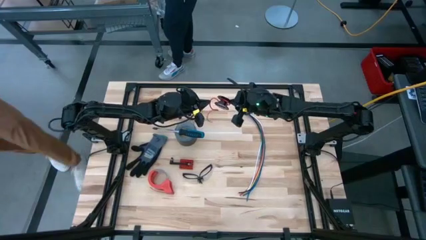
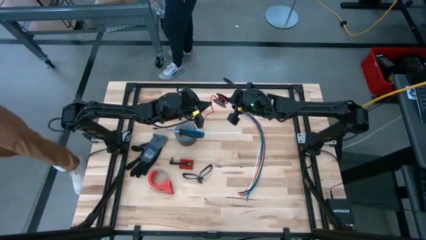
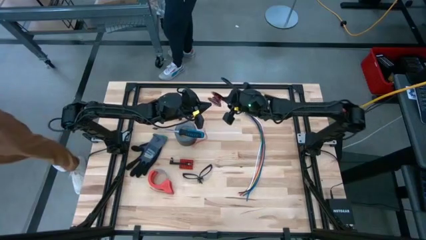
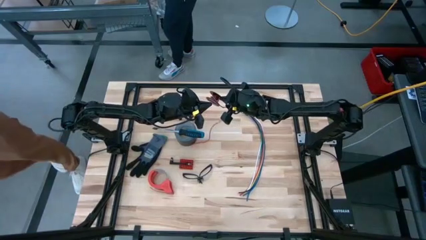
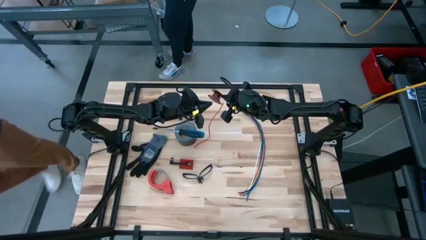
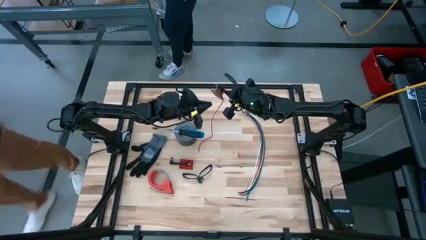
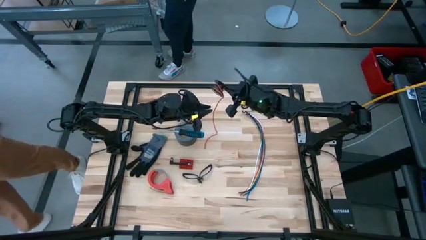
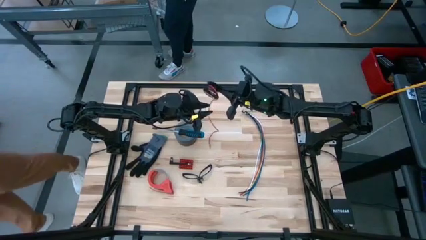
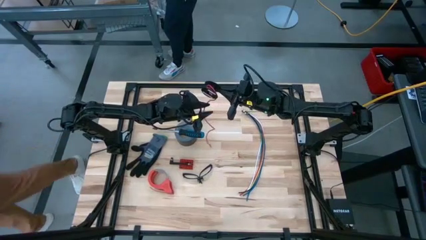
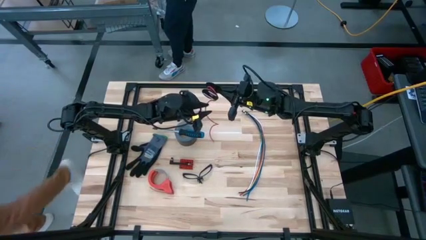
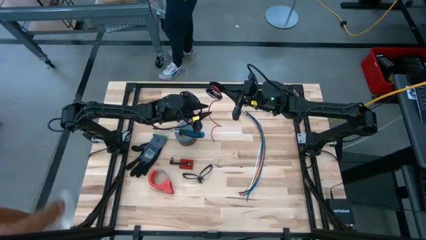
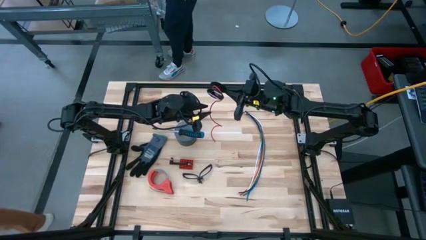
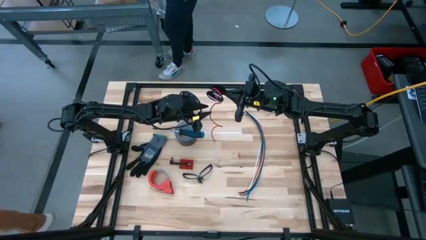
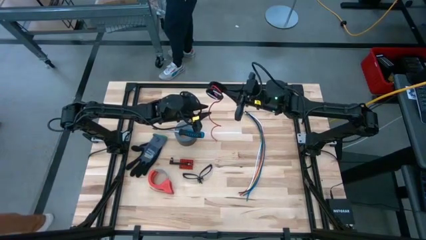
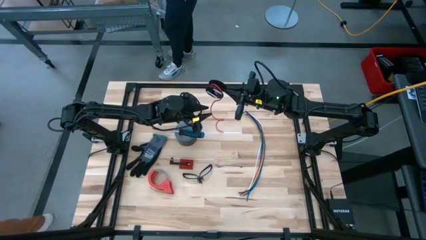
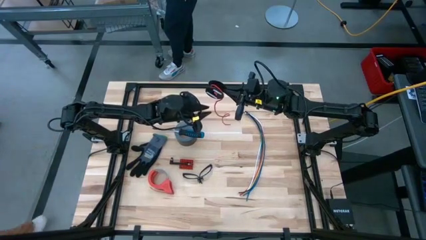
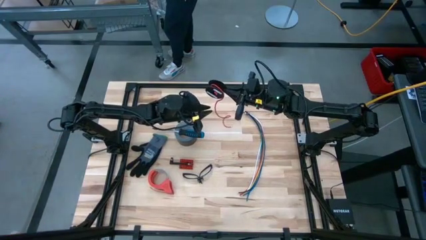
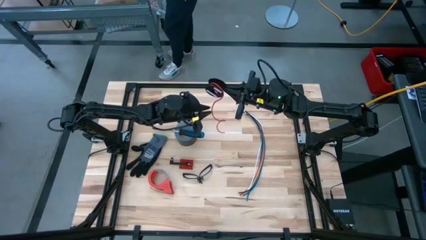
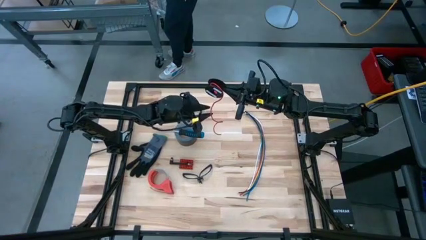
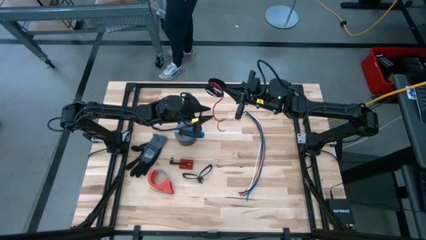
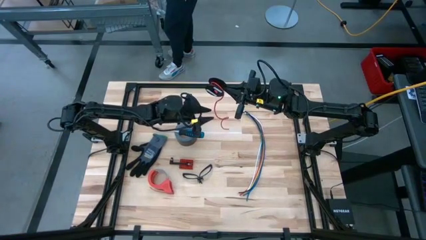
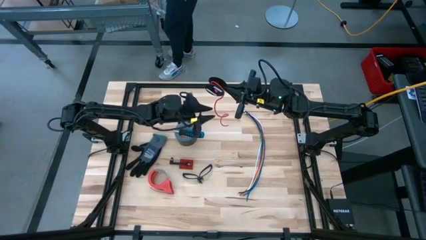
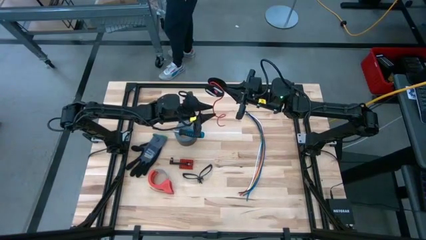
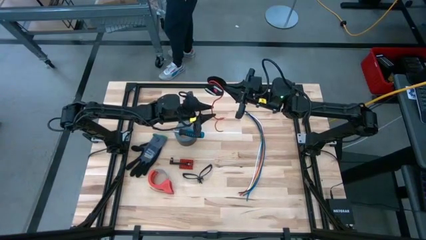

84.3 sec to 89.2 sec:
Task: Coil cords
Coil the red wire into the black spool

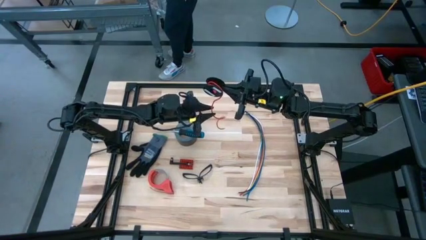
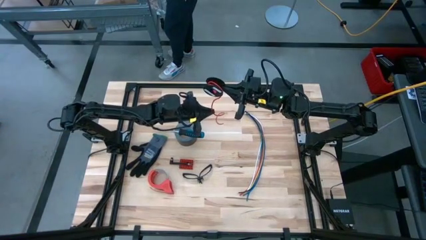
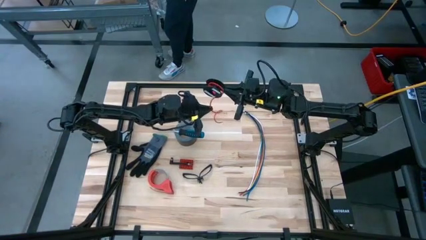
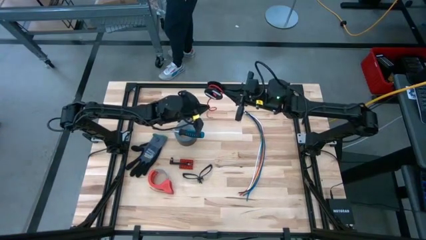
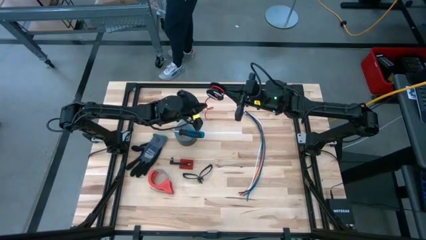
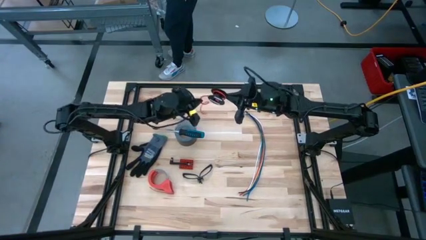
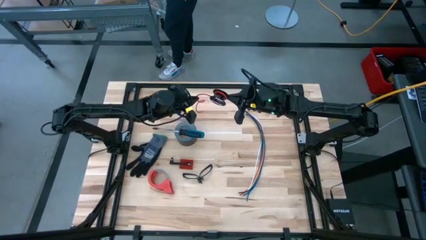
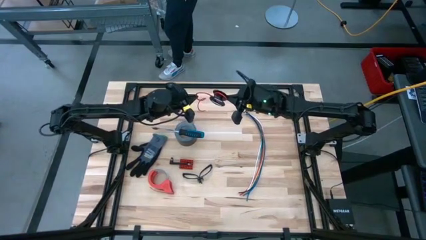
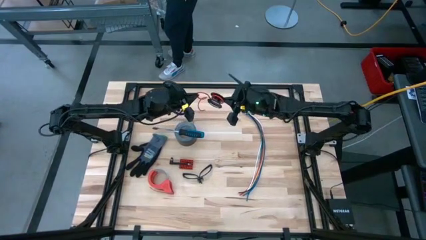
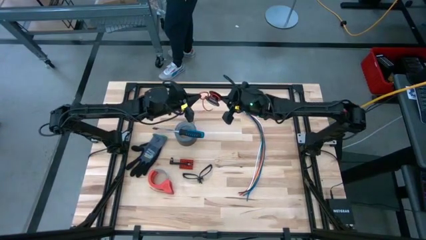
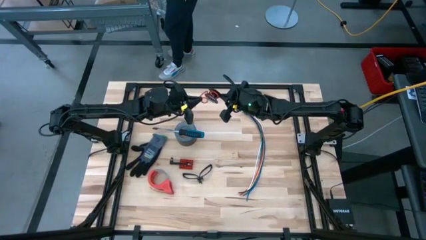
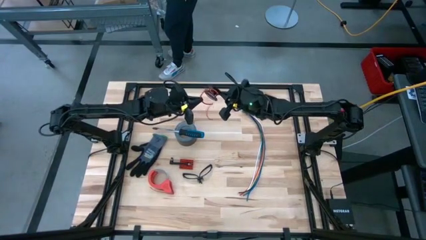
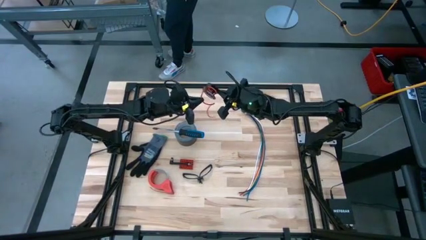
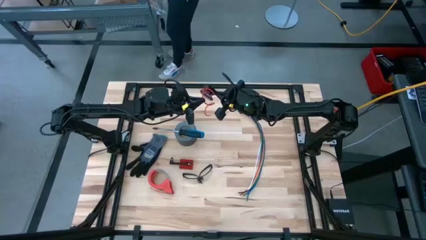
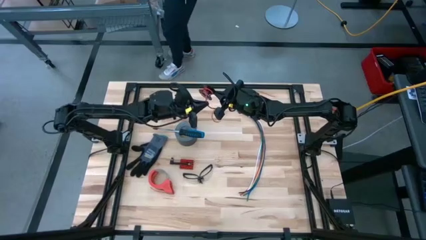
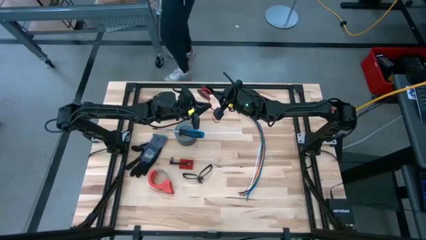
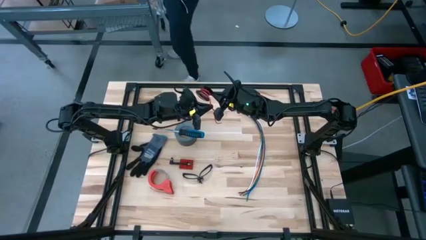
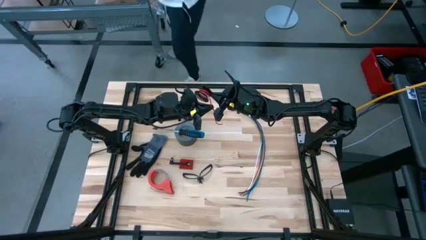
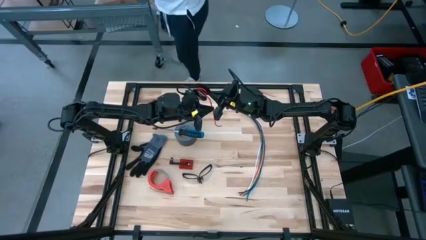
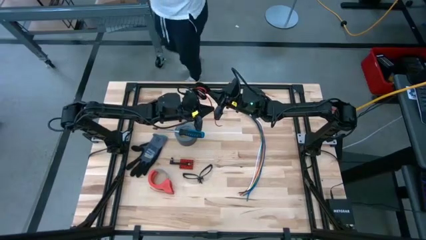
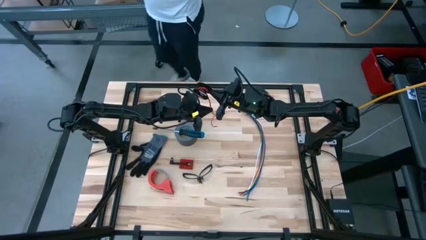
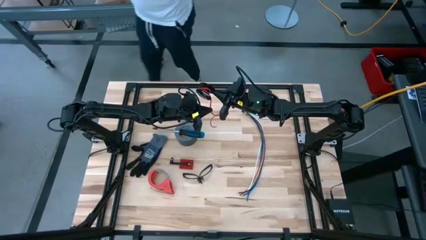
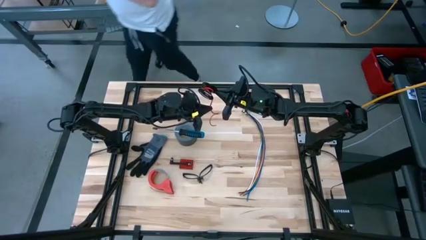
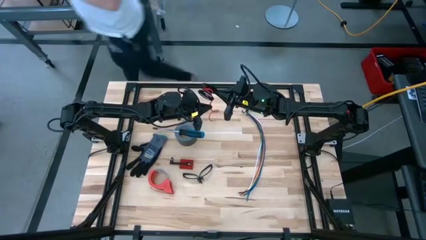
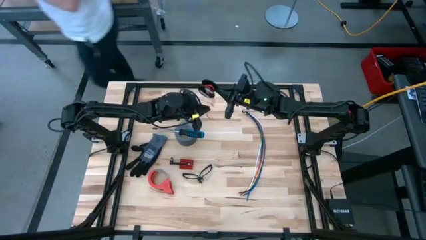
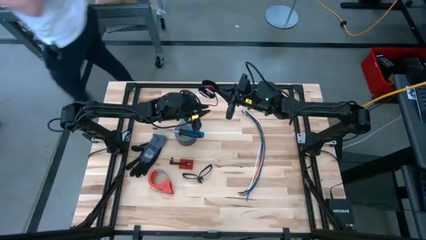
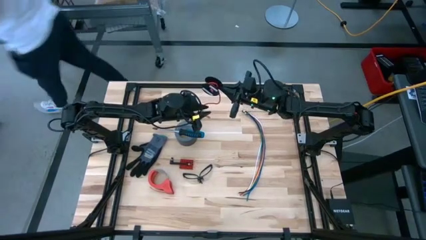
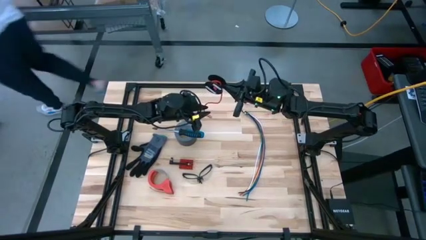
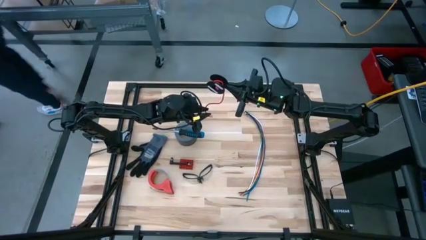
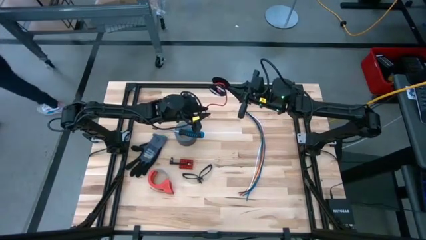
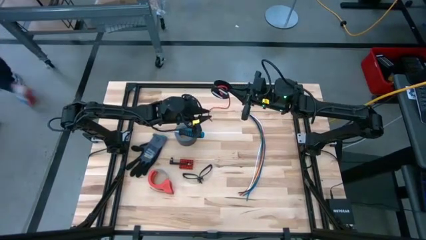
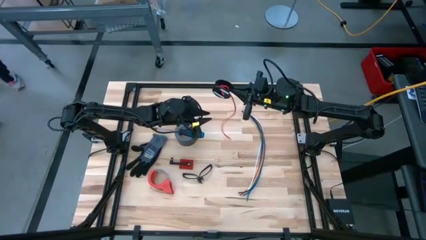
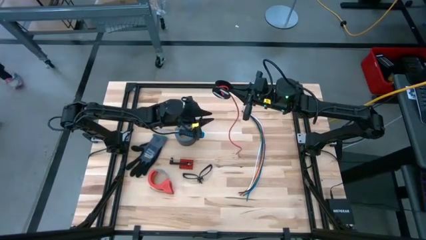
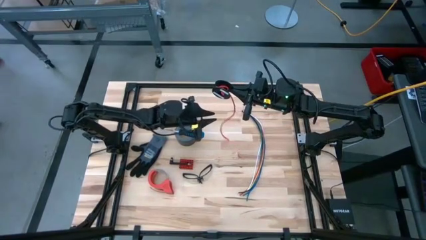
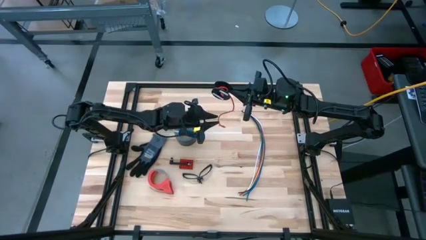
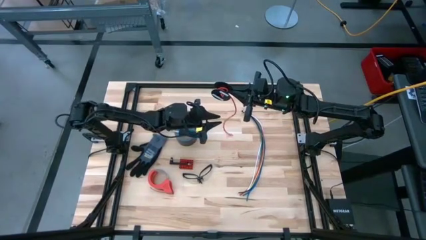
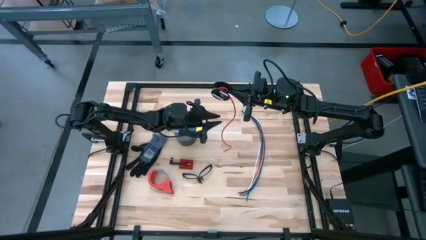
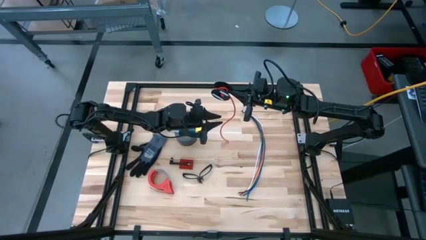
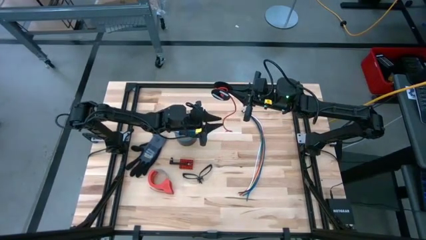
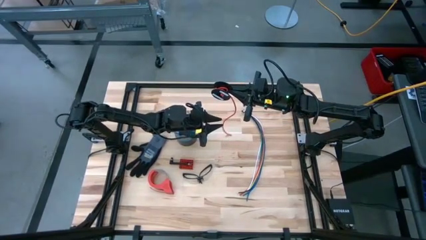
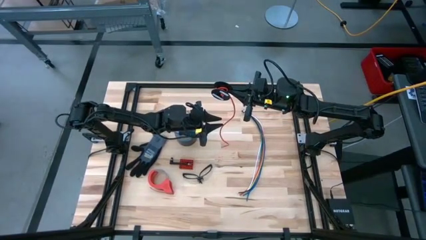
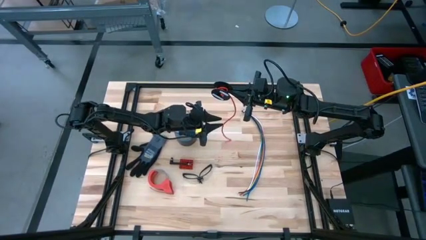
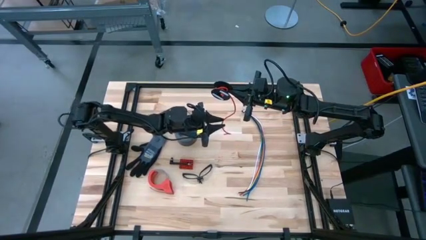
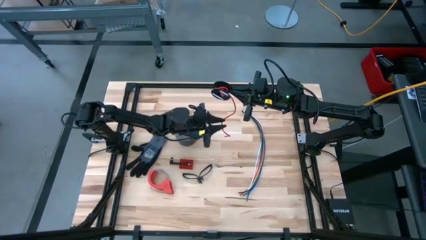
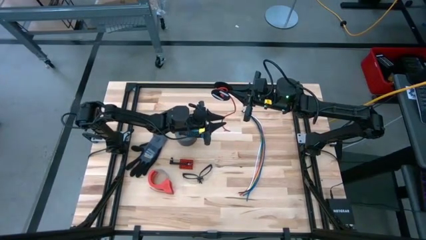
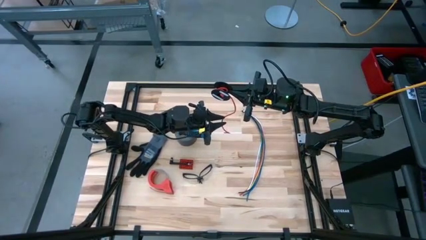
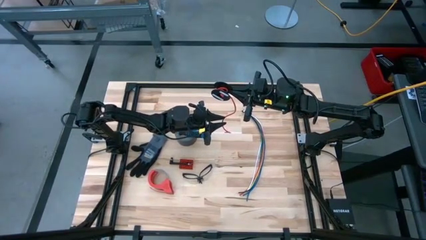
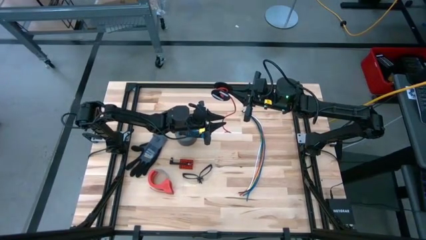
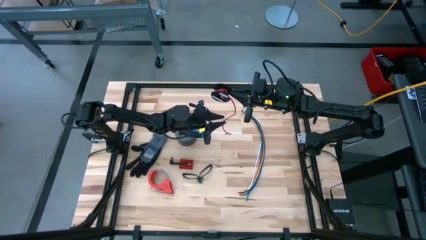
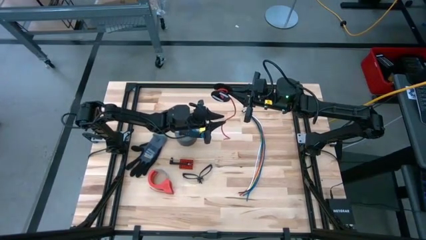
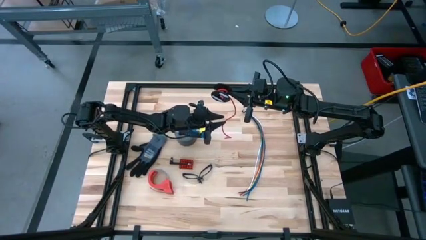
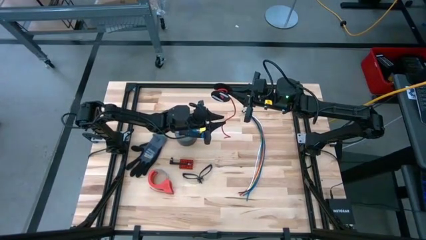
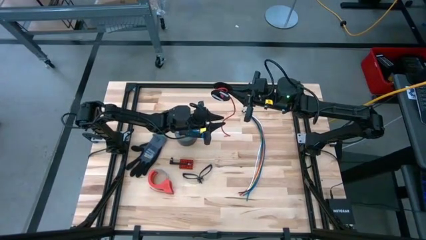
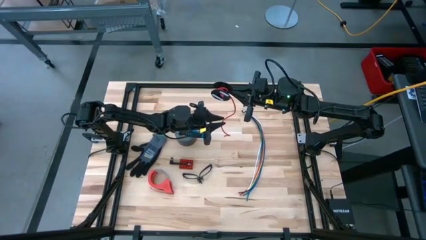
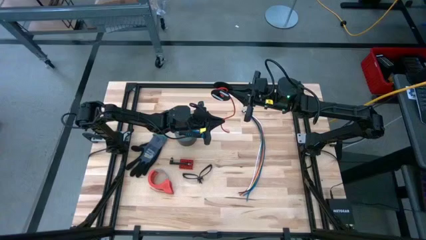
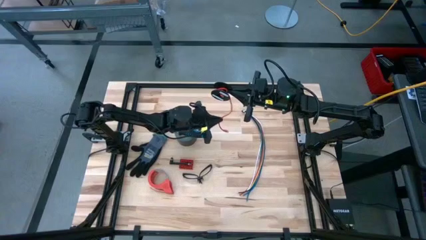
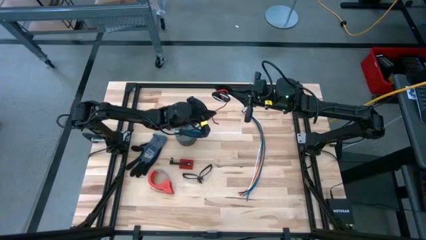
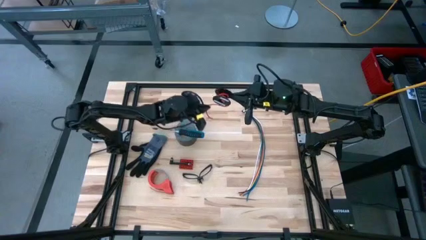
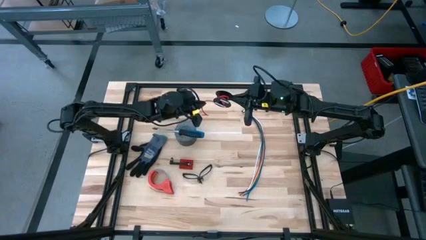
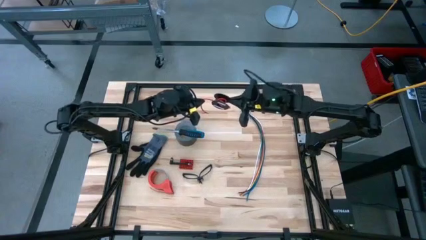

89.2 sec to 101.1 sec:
Coil the red wire into the black spool
